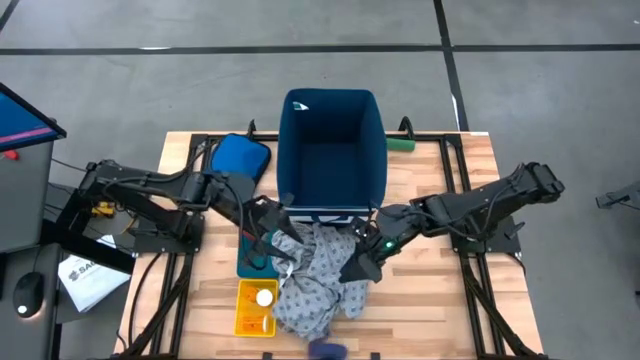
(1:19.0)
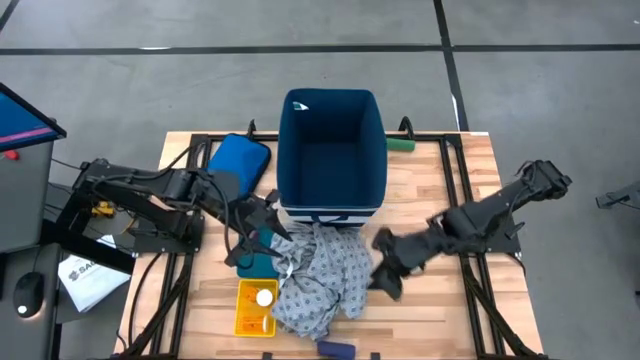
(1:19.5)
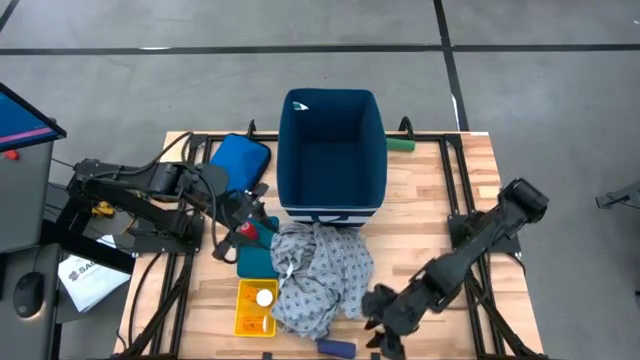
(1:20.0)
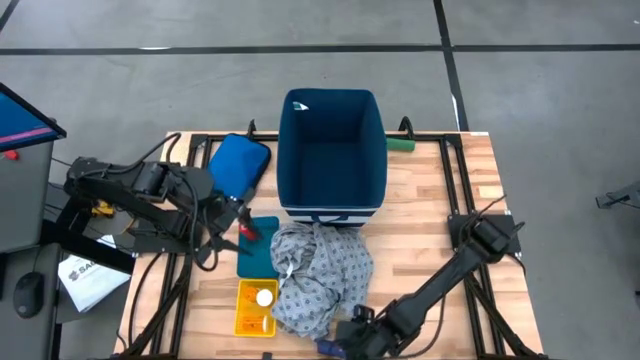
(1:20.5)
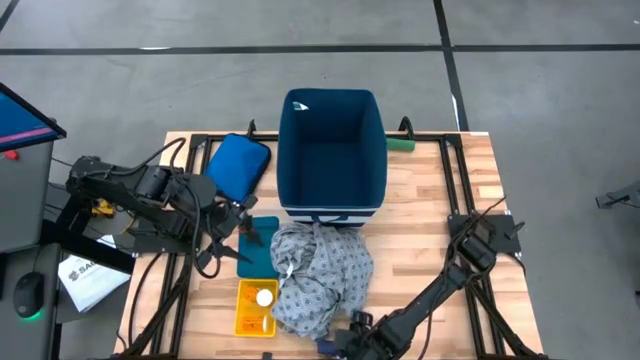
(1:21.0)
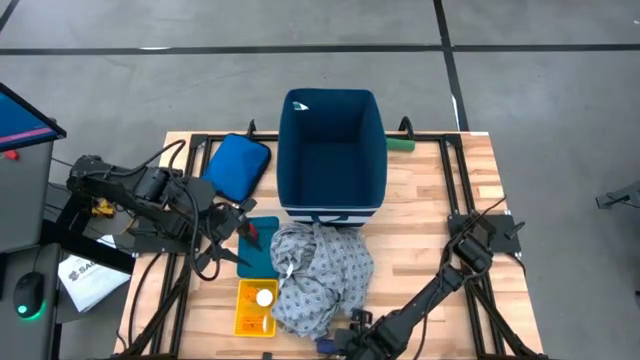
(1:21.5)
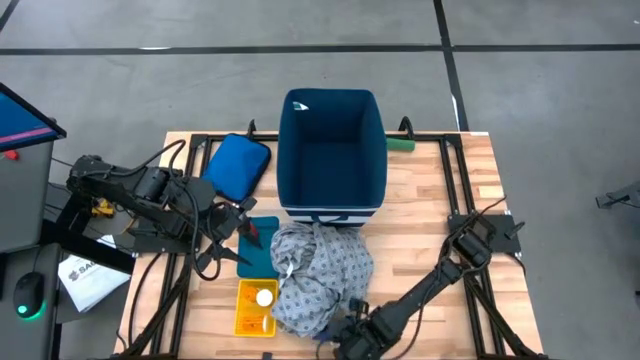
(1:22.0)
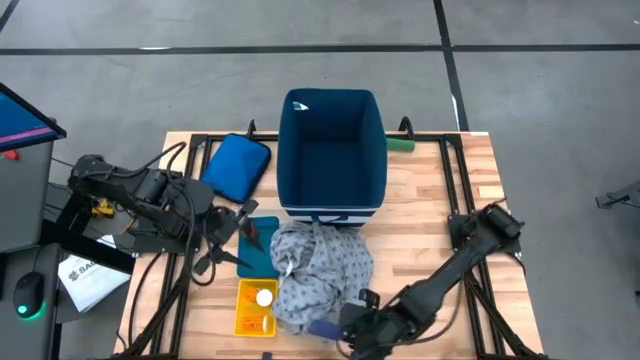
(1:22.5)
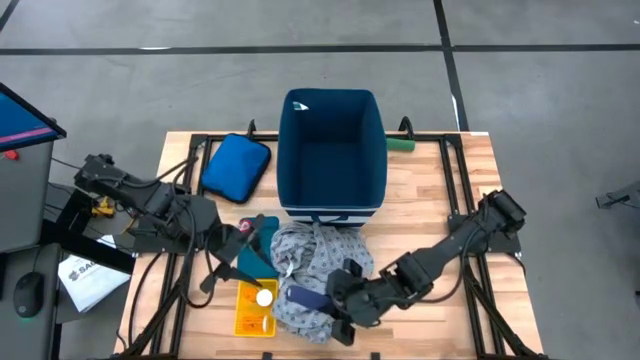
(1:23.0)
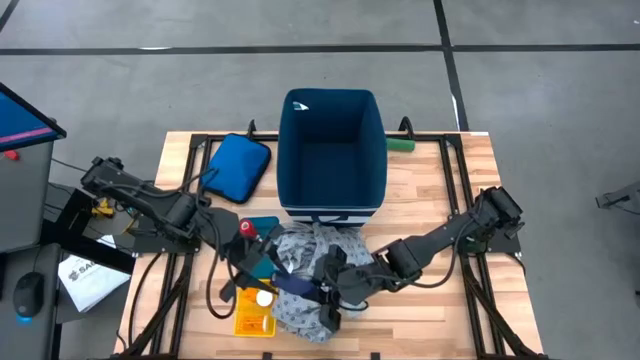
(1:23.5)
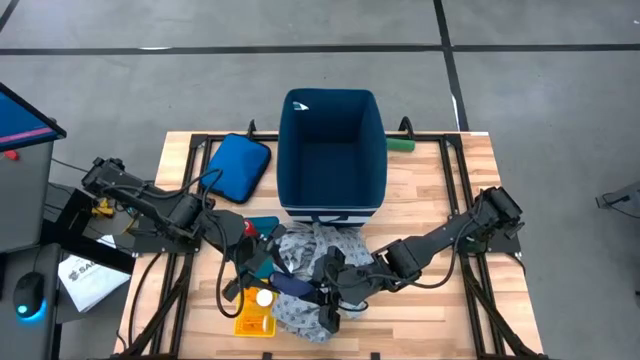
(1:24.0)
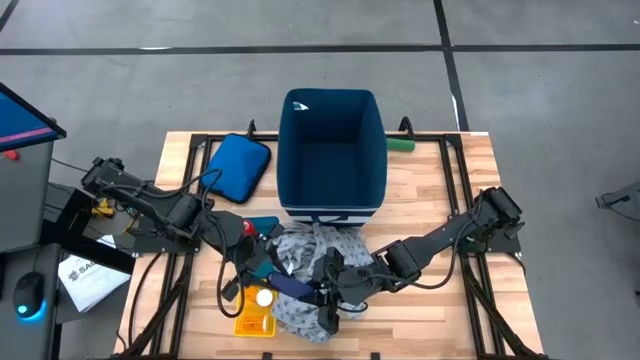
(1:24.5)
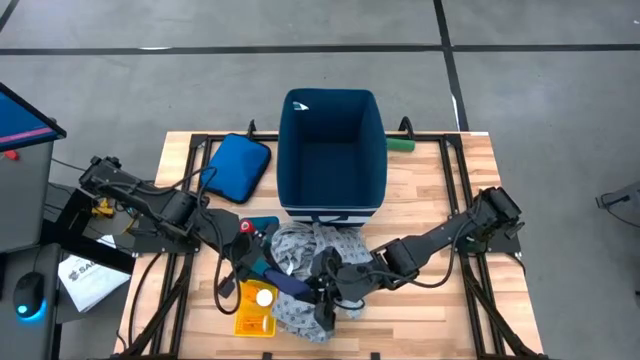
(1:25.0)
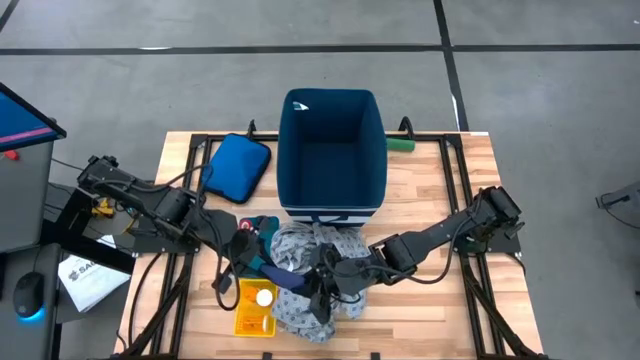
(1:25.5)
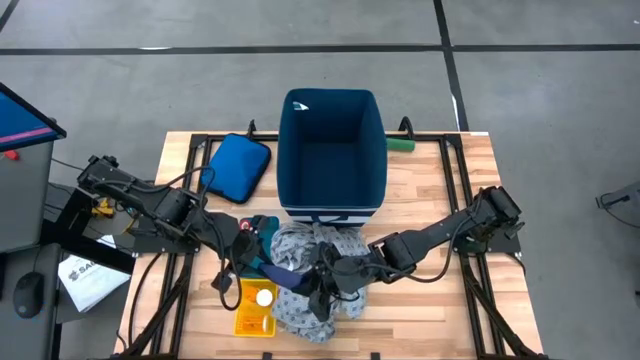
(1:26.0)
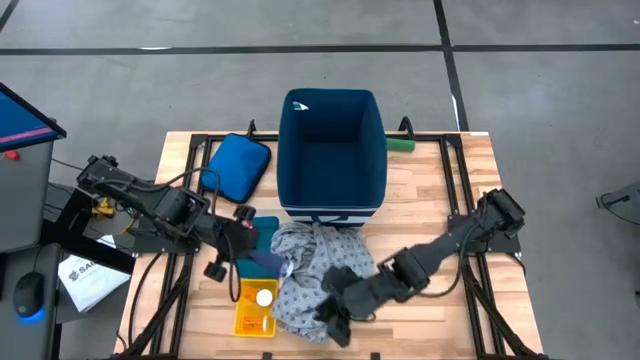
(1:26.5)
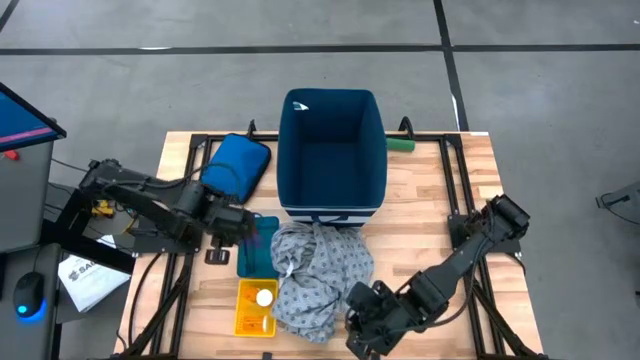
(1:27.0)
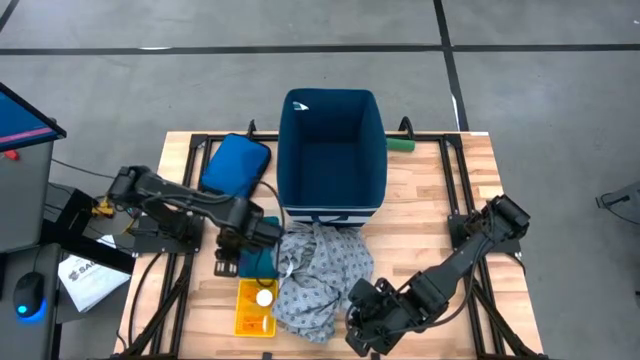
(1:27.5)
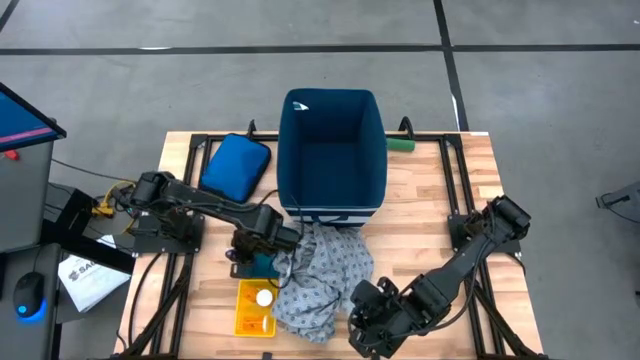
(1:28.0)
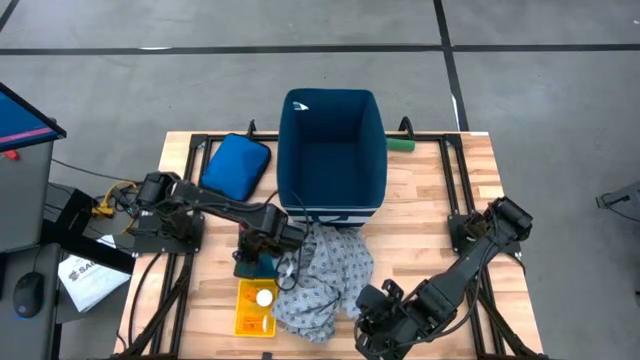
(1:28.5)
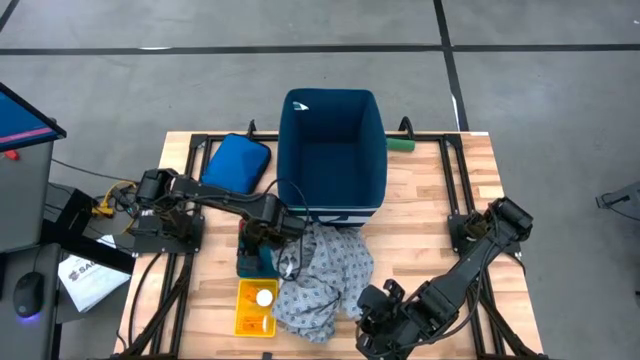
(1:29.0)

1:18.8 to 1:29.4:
Task: Pick & place medical supplies in basket/bin
Put the blue bandage into the blue bin

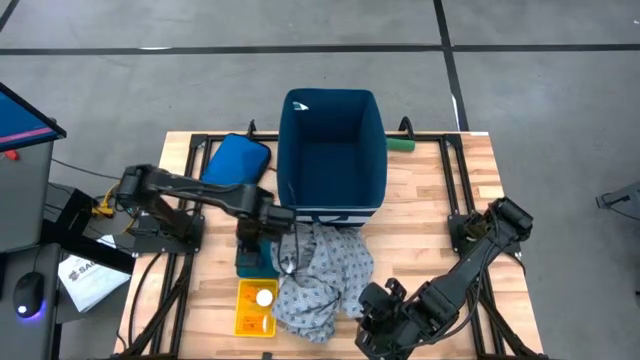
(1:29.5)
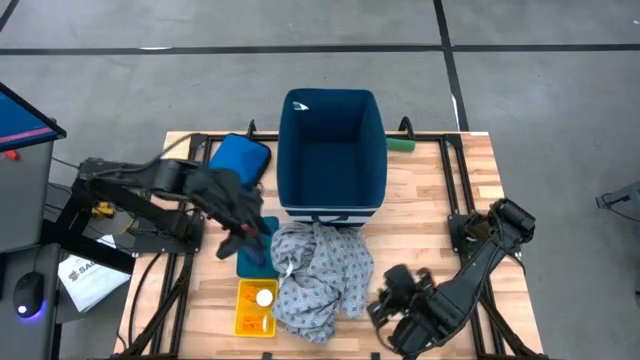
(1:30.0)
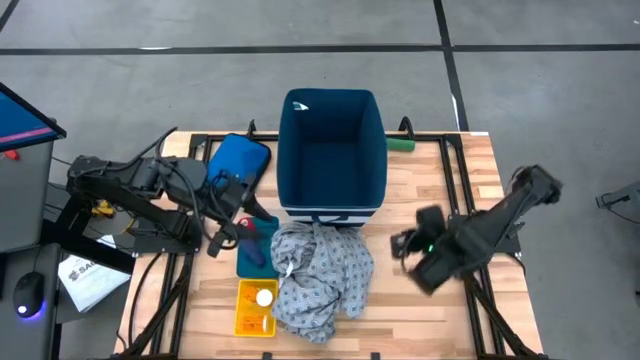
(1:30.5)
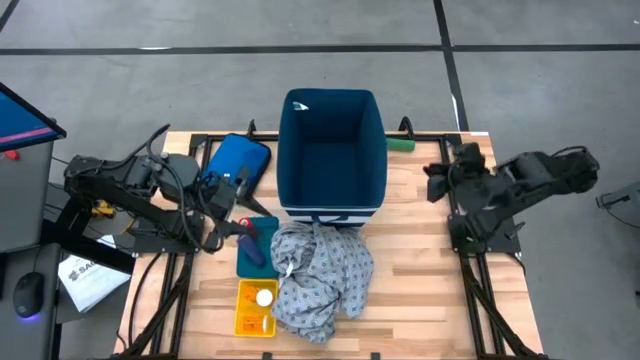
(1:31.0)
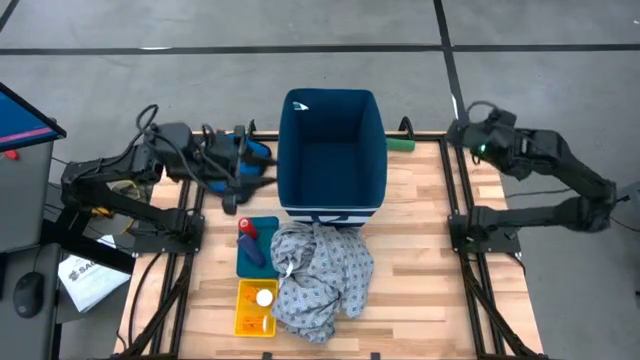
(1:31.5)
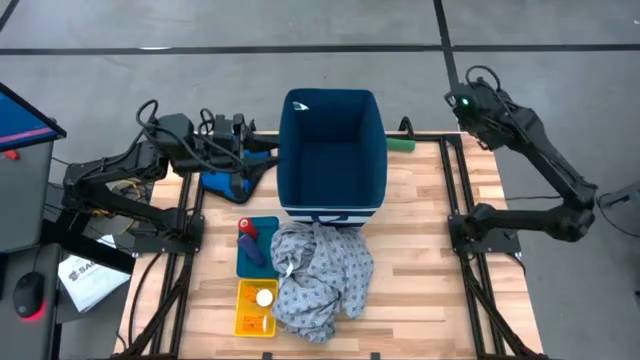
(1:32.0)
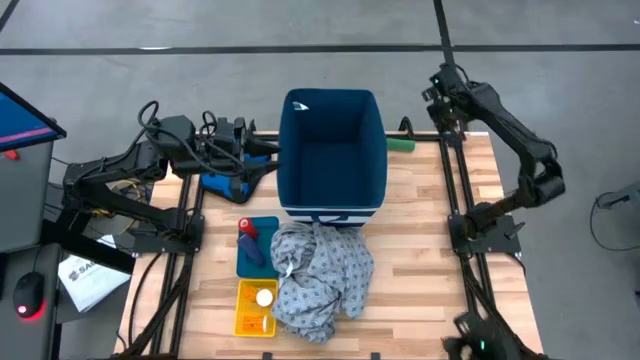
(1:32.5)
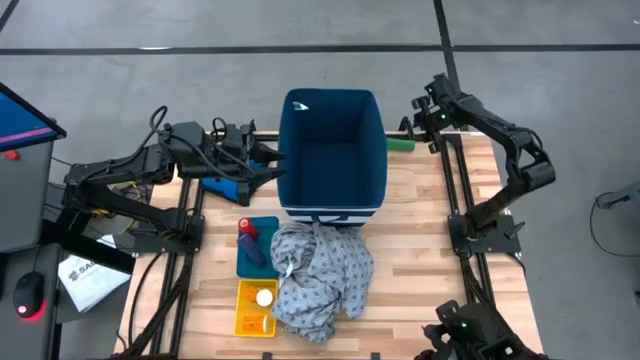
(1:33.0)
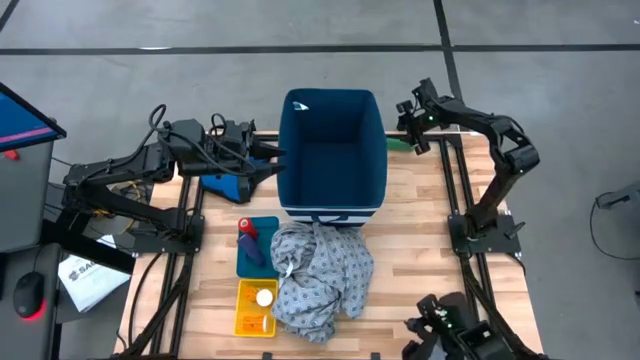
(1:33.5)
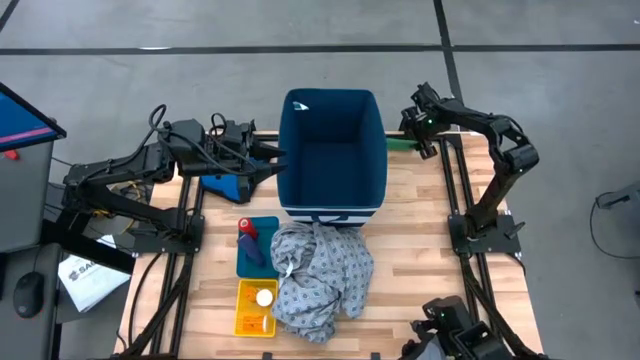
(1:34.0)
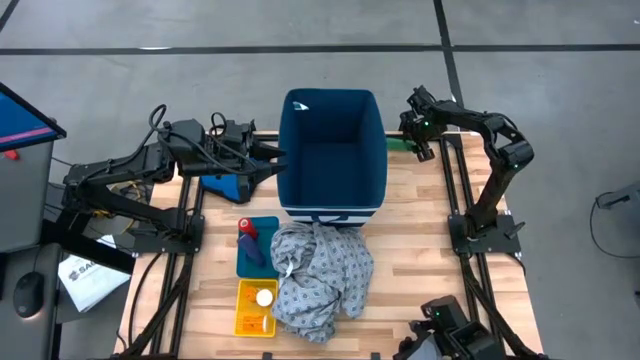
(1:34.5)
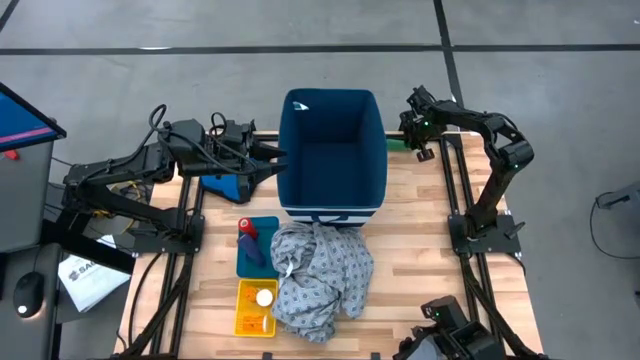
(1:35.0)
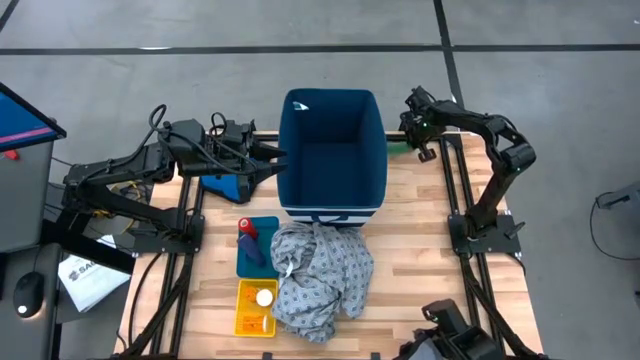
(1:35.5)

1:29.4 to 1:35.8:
Put the green bandage into the blue bin

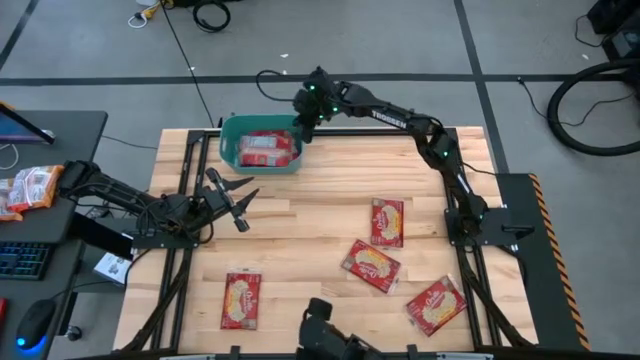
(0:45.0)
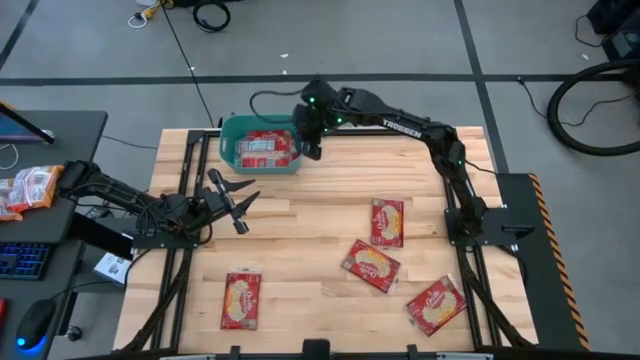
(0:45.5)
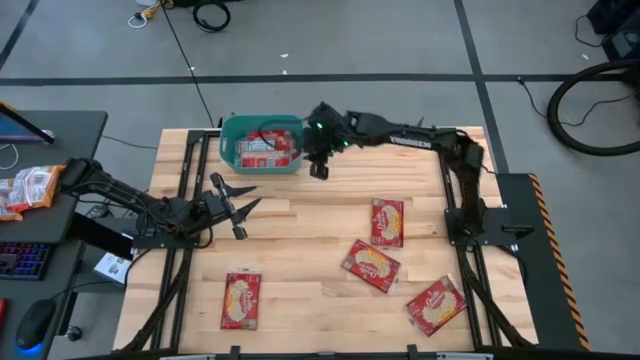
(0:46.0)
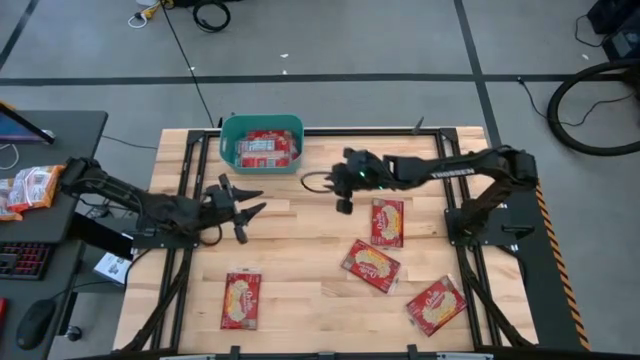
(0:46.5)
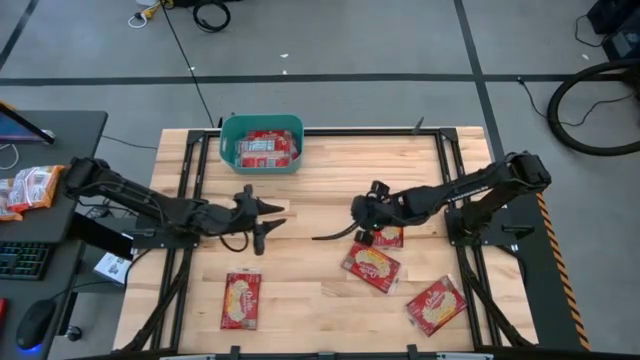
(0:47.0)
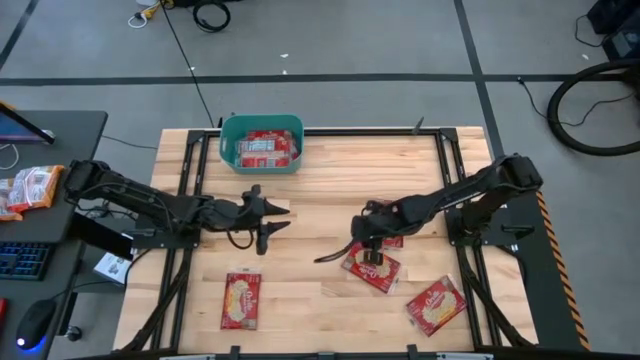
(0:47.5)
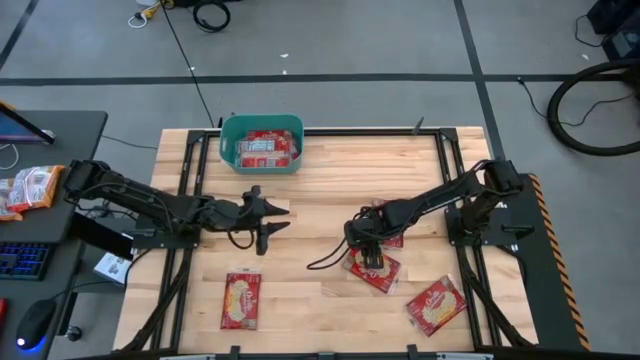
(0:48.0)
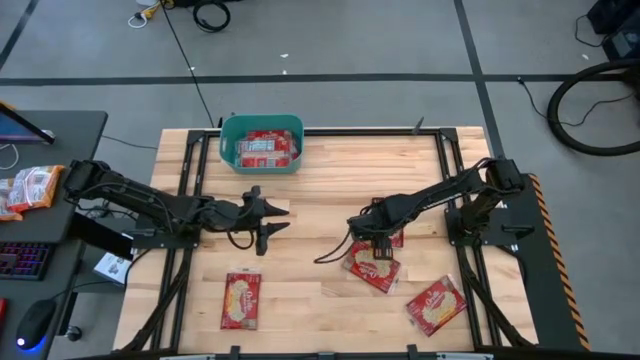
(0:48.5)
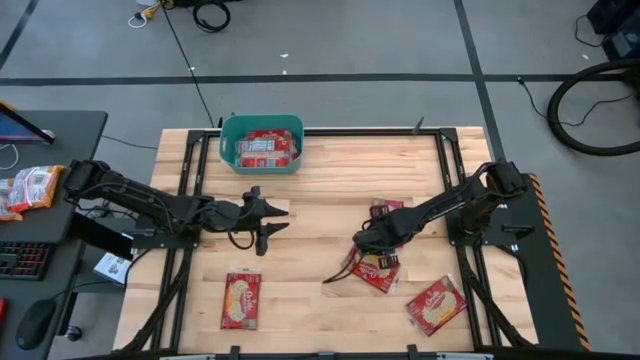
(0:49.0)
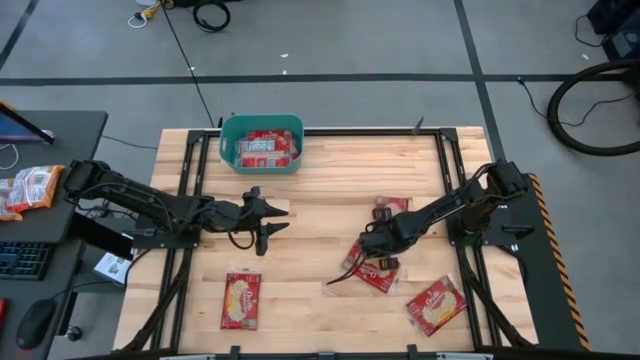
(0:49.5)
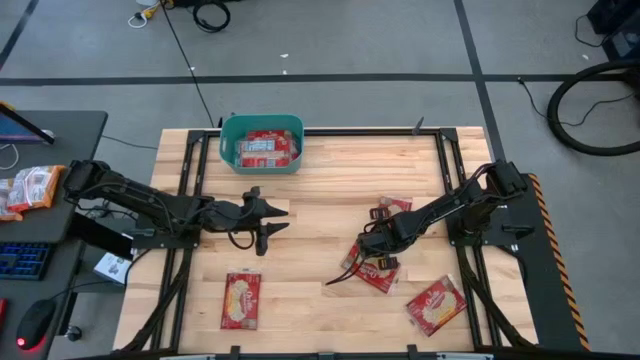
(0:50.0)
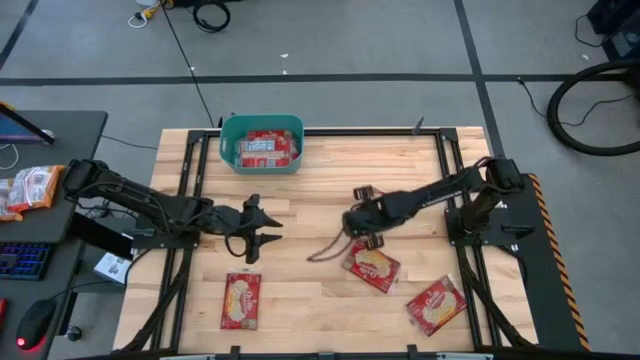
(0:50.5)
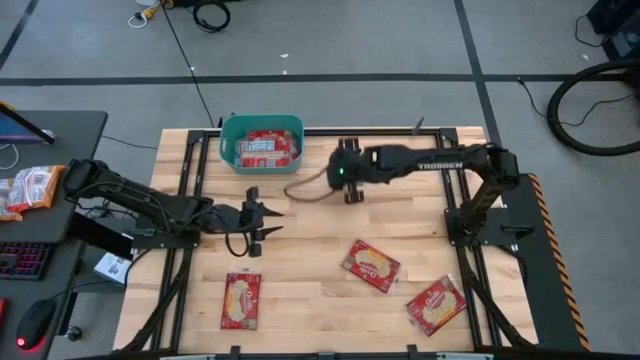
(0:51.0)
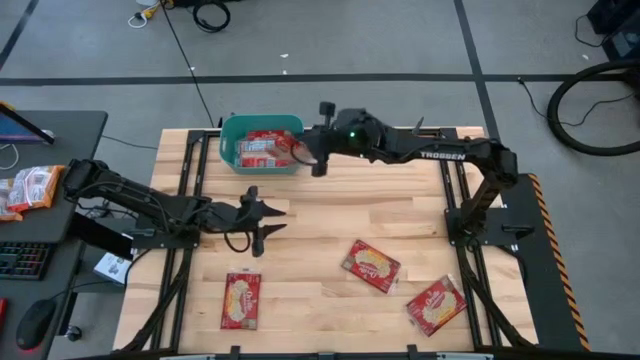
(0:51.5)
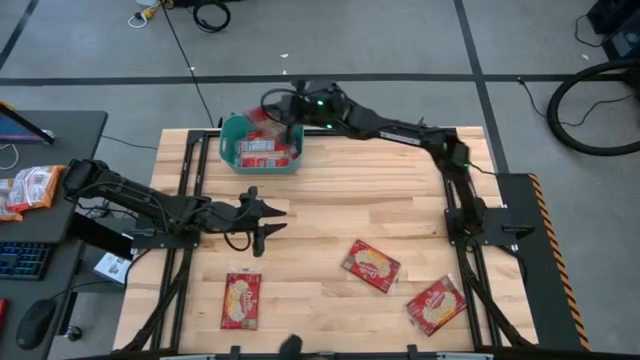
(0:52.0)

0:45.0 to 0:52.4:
Task: Sort popcorn bags into baskets
Put the popcorn bag into the blue bin
